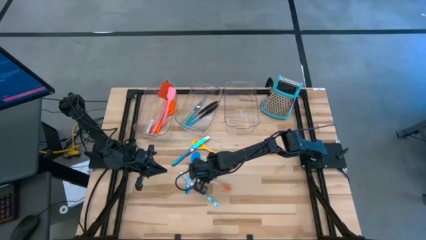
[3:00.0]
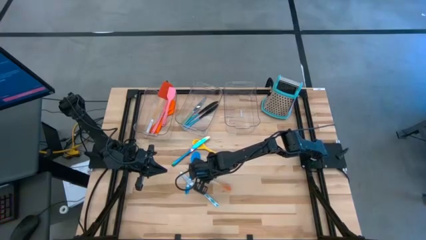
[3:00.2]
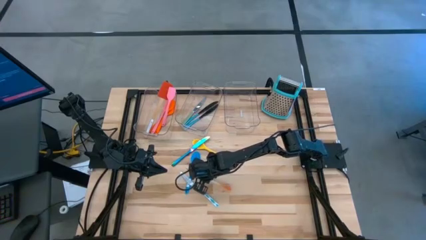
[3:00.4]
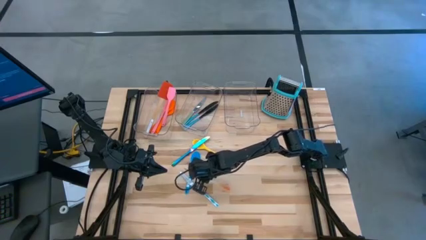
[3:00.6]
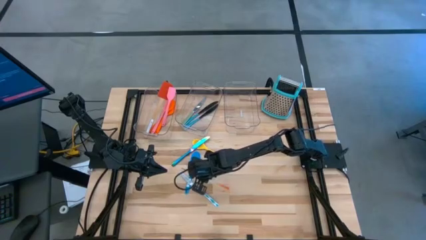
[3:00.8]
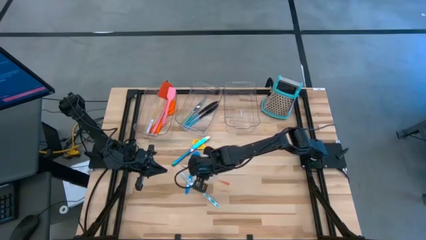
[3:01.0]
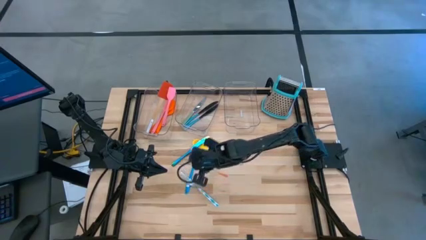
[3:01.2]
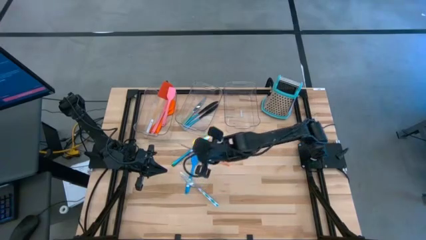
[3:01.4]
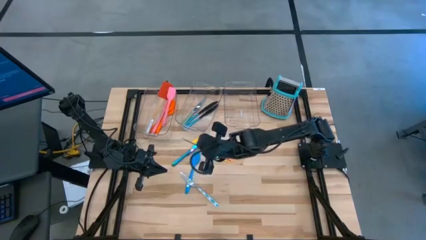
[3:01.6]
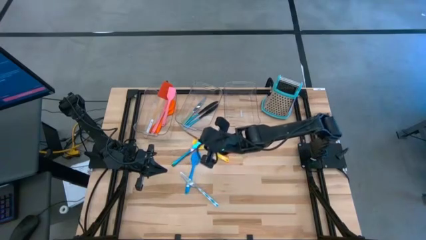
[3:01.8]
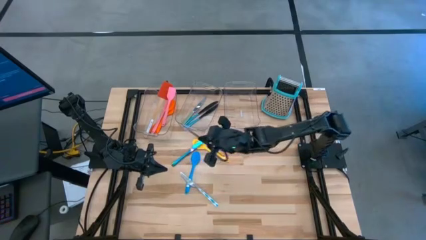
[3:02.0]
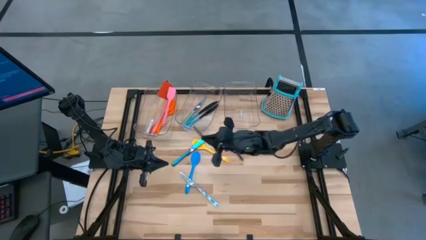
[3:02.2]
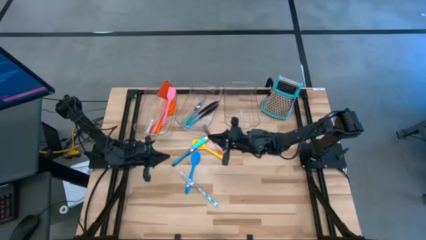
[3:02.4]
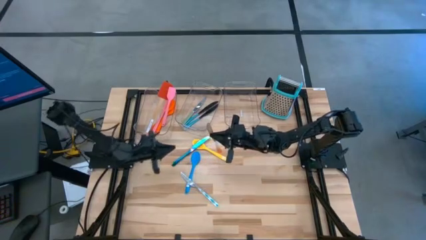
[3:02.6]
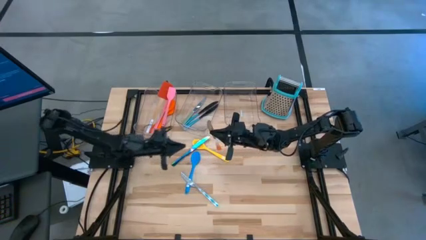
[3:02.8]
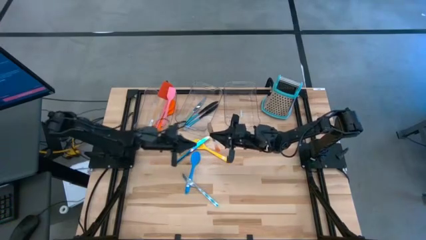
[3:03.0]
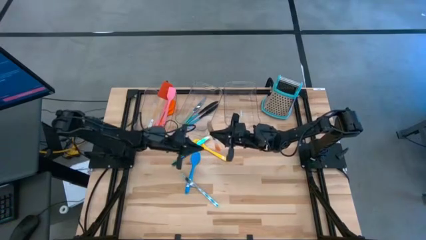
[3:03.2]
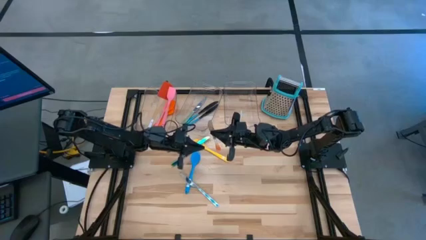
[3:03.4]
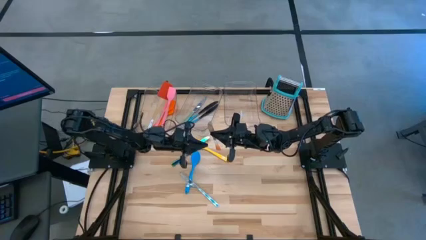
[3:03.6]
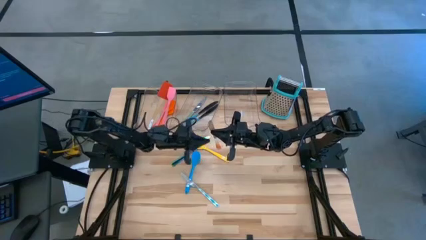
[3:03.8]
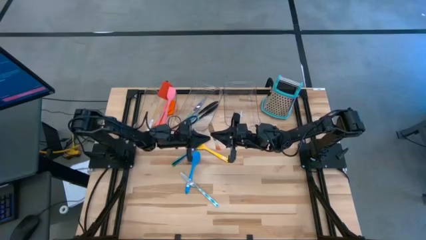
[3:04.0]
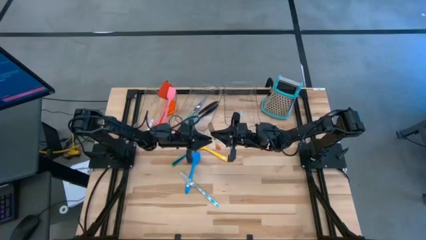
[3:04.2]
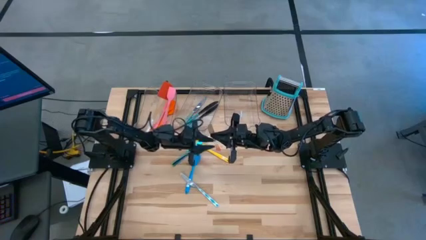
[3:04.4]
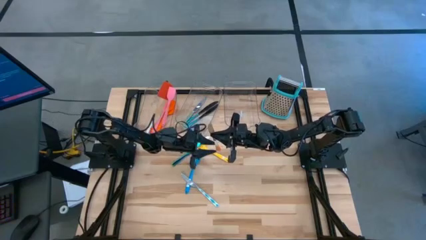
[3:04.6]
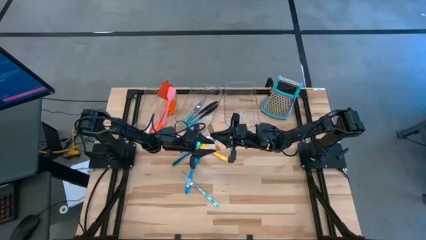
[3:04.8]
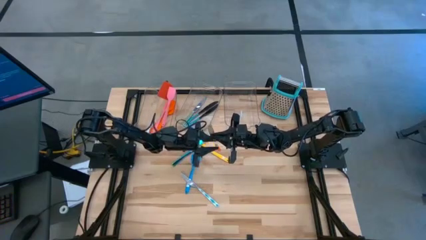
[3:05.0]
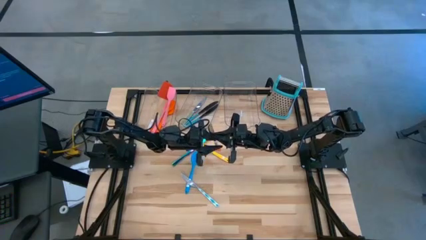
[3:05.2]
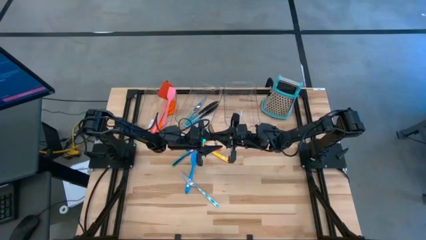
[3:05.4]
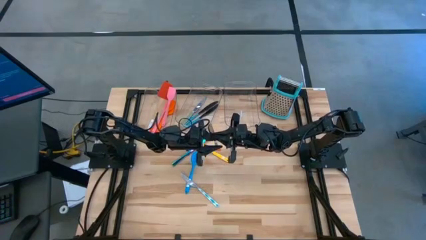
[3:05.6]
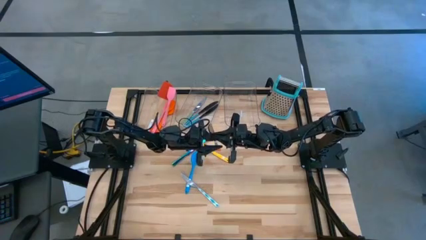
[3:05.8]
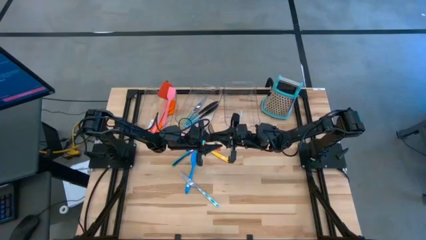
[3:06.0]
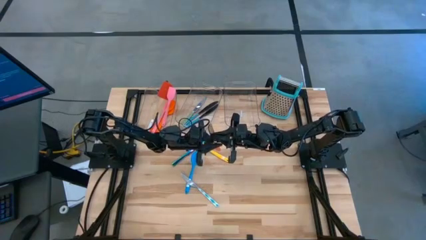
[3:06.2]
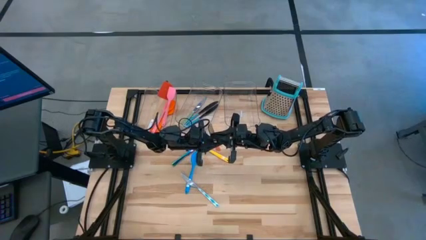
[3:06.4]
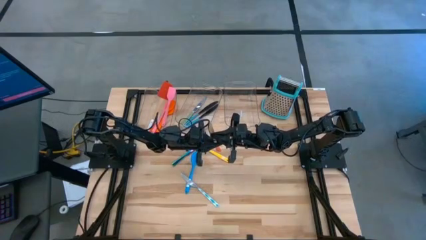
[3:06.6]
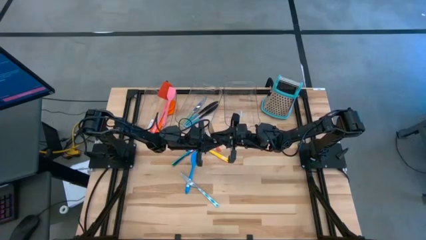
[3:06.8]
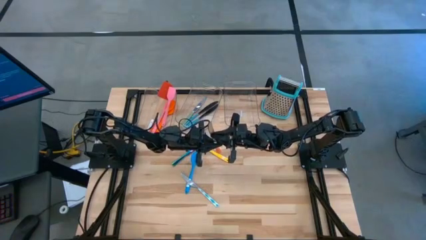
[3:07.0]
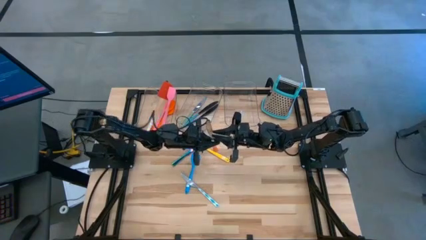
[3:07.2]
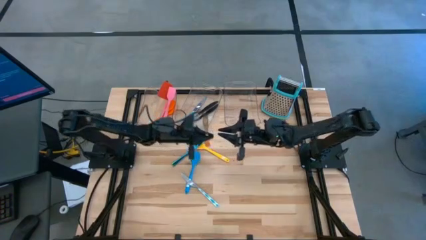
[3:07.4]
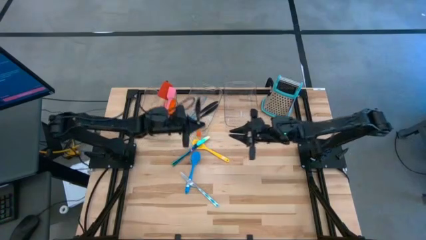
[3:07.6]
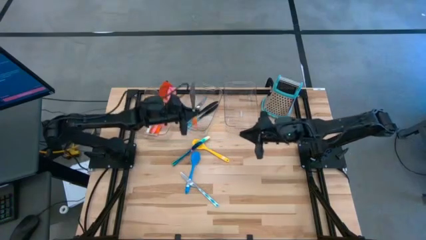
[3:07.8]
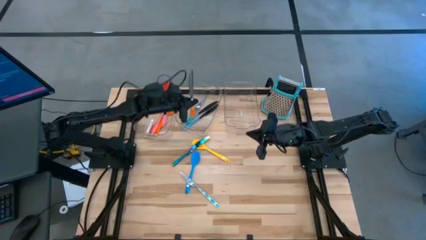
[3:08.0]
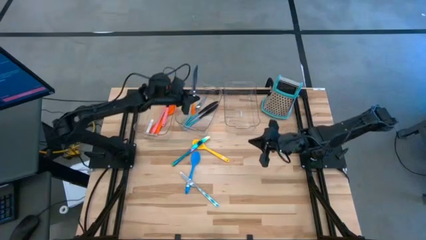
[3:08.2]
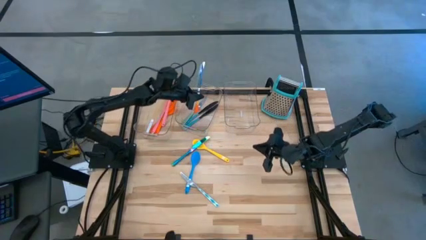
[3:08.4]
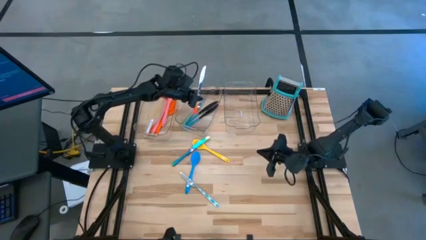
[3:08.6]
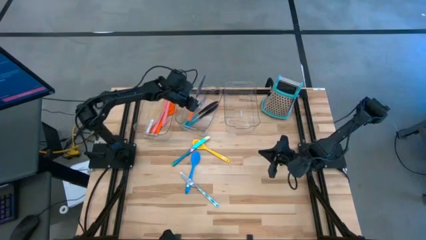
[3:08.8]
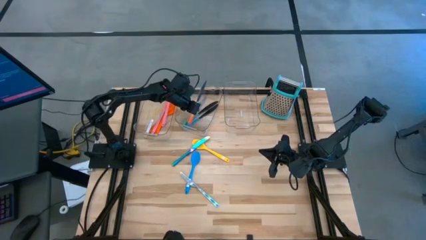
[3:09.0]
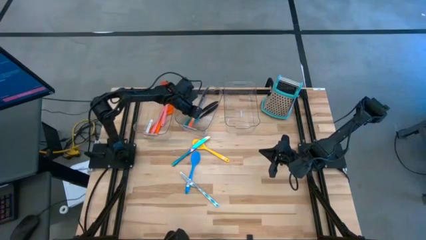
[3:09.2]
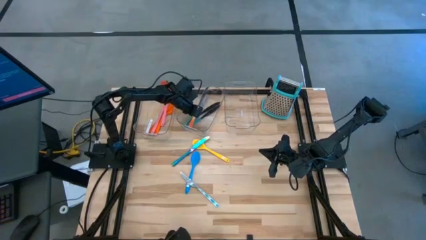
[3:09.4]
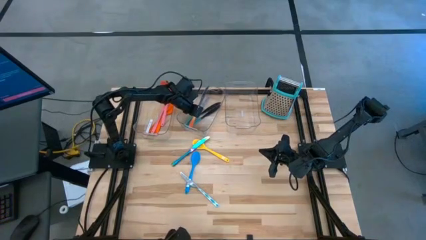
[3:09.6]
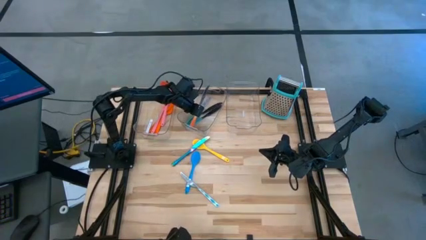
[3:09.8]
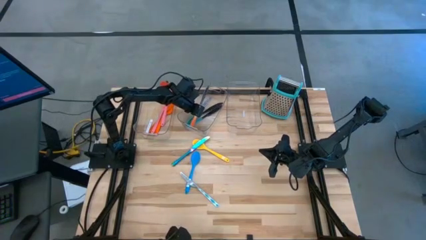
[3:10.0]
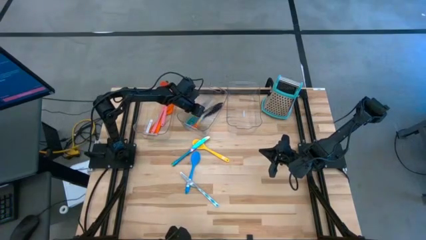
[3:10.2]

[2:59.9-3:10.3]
Task: Pick & Place Kitchen Items
Put the orange knife into the middle transparent bin

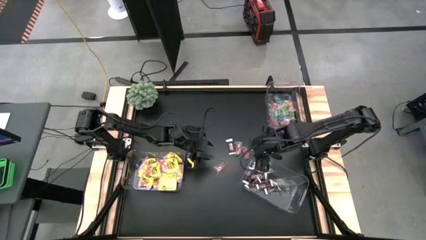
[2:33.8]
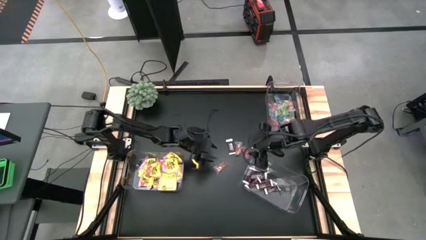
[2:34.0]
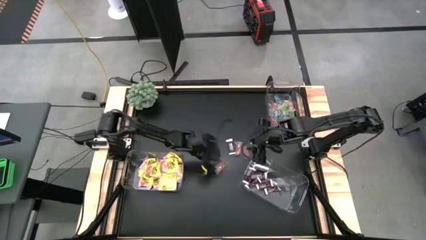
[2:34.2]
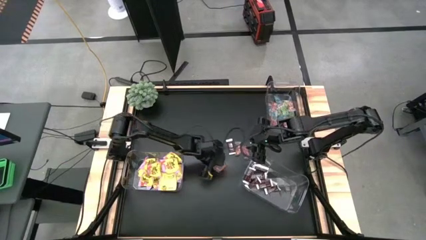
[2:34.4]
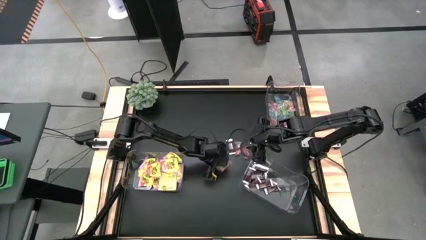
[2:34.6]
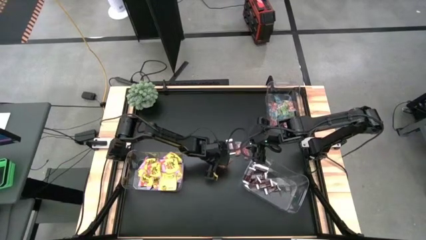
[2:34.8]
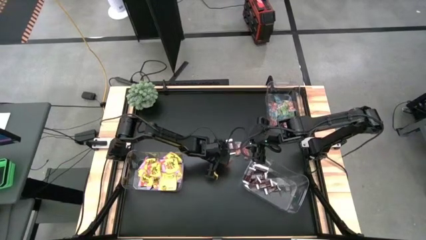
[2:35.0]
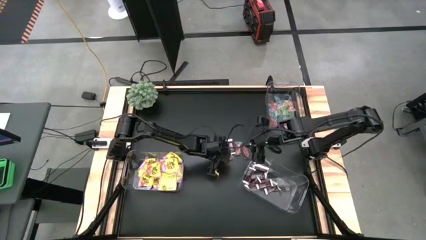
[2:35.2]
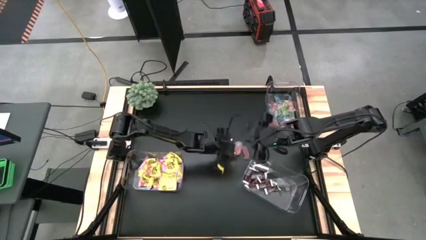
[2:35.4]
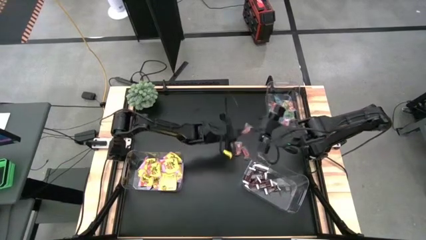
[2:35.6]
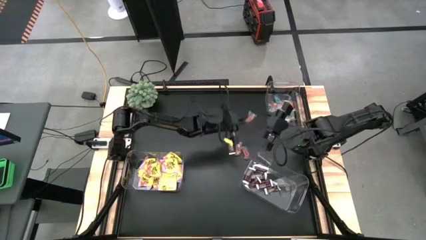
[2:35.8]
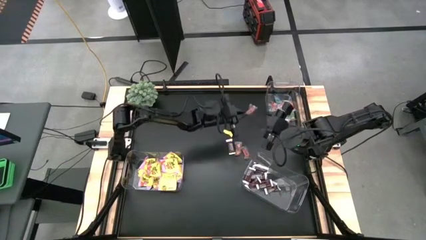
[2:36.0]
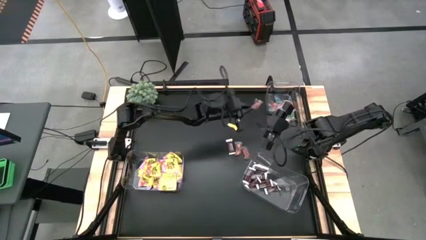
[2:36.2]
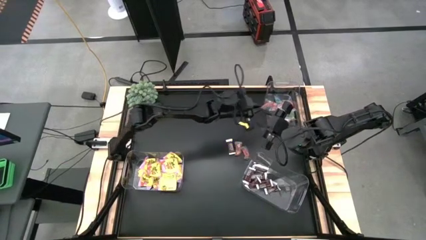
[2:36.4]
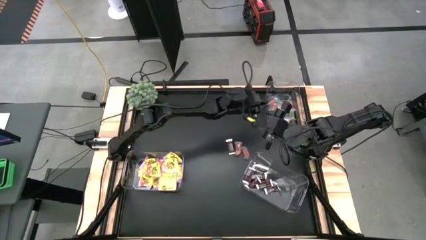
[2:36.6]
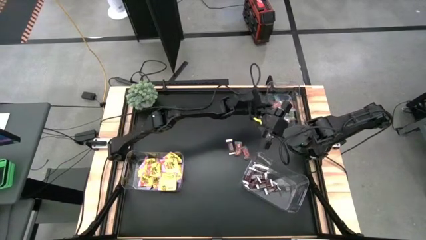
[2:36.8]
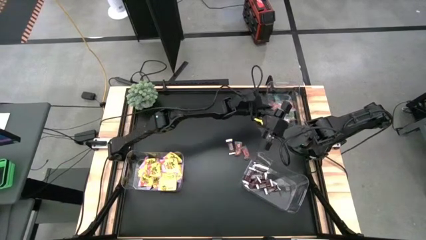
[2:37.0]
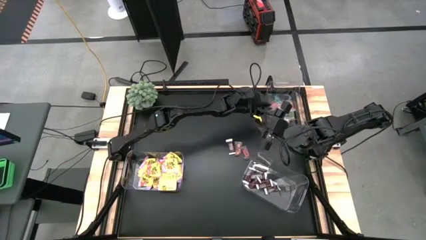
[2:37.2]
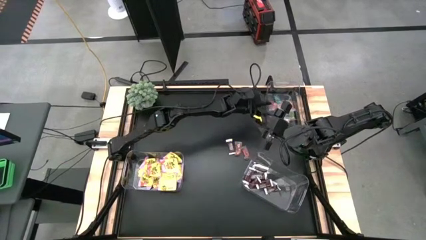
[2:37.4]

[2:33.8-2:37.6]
Task: Sort candy
Put the orange candy in the top right transparent container
